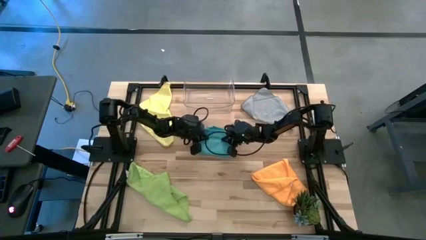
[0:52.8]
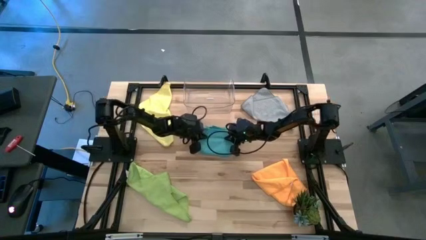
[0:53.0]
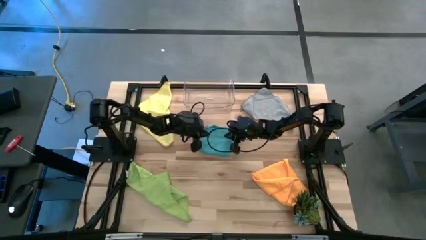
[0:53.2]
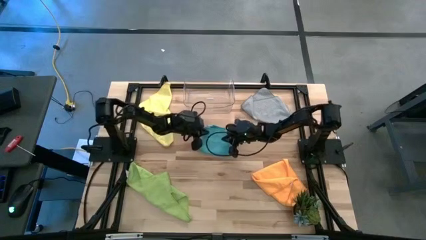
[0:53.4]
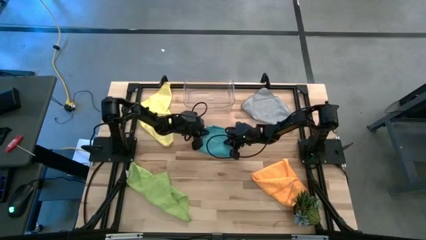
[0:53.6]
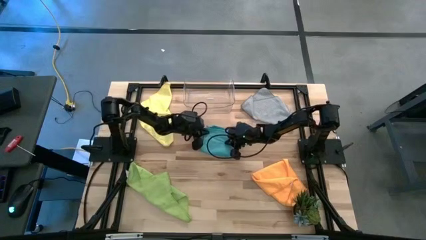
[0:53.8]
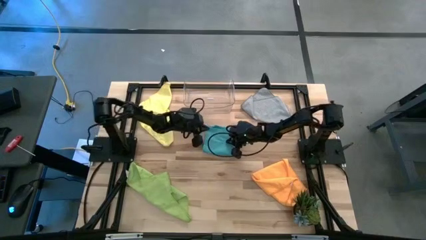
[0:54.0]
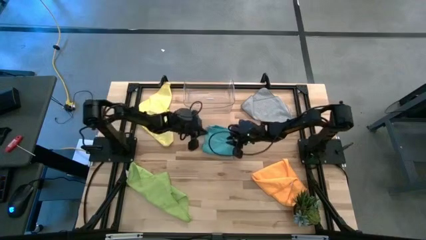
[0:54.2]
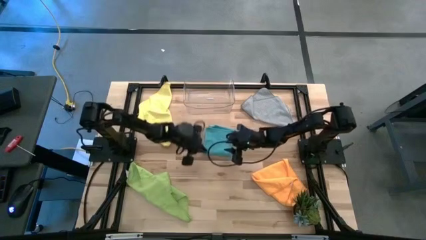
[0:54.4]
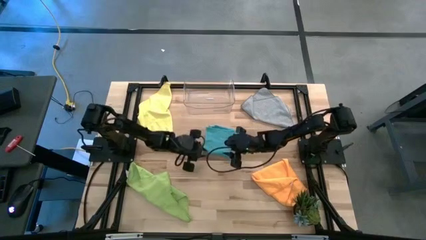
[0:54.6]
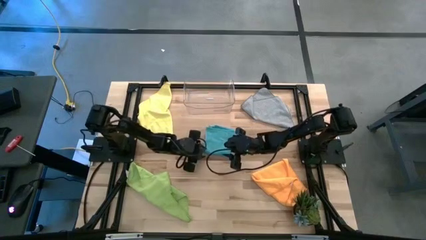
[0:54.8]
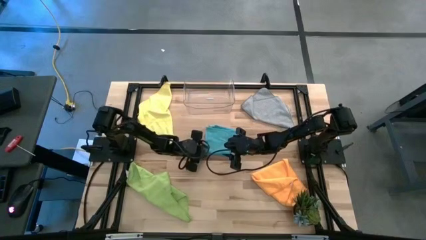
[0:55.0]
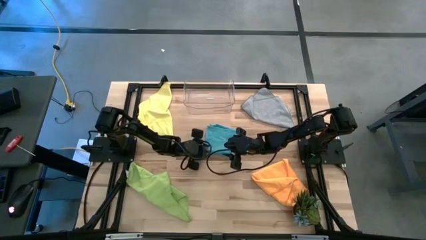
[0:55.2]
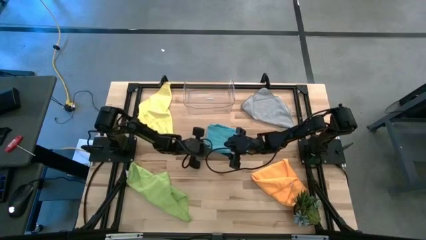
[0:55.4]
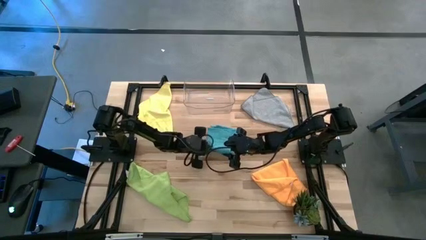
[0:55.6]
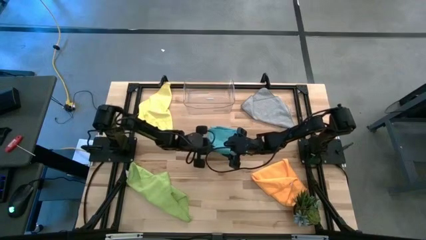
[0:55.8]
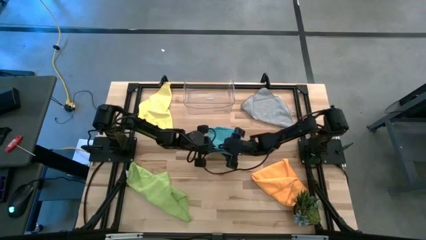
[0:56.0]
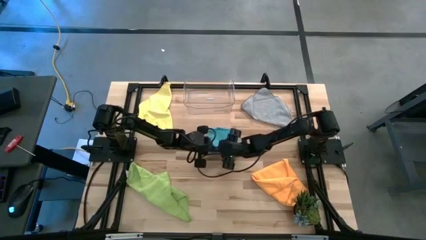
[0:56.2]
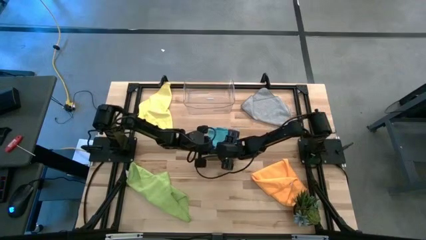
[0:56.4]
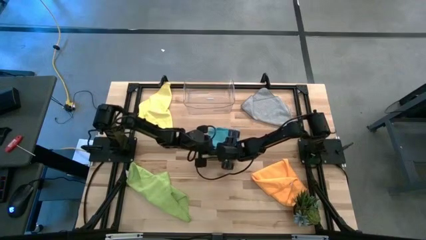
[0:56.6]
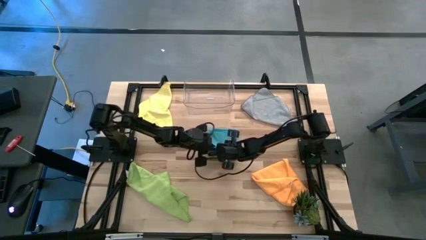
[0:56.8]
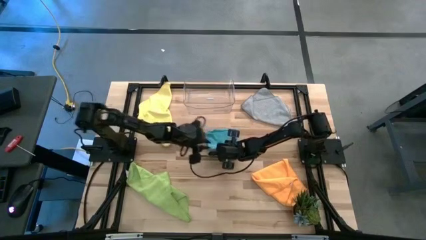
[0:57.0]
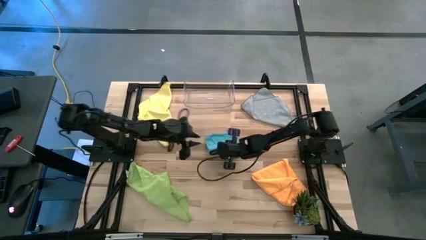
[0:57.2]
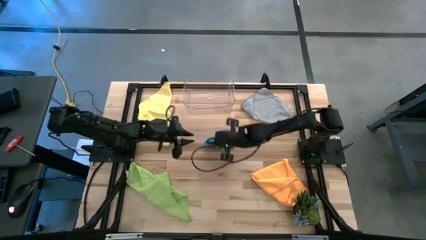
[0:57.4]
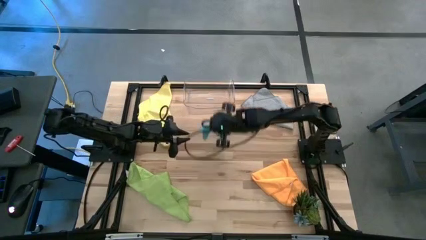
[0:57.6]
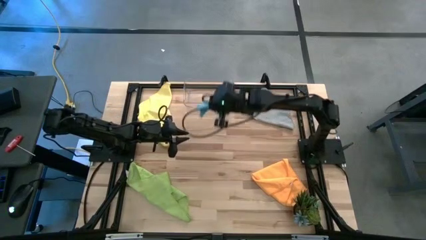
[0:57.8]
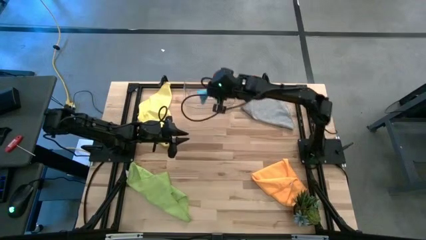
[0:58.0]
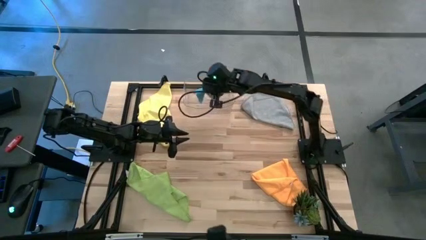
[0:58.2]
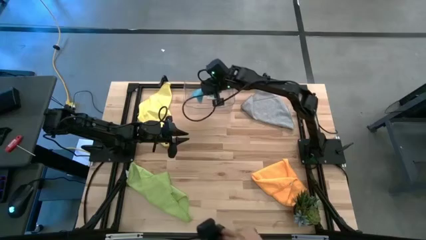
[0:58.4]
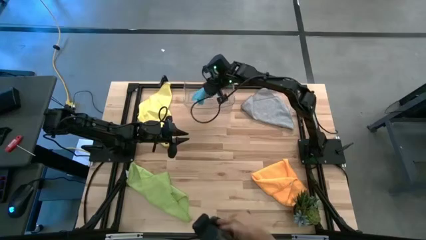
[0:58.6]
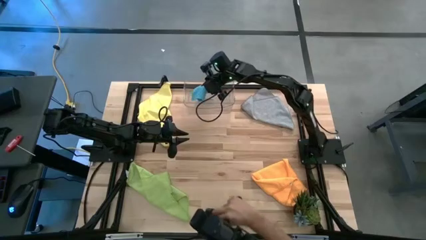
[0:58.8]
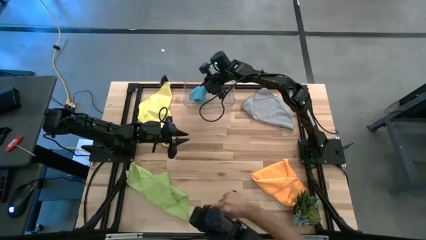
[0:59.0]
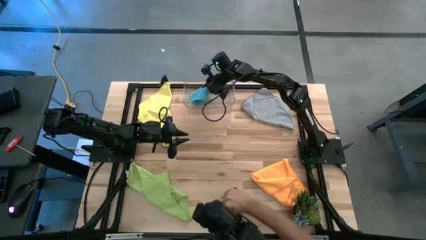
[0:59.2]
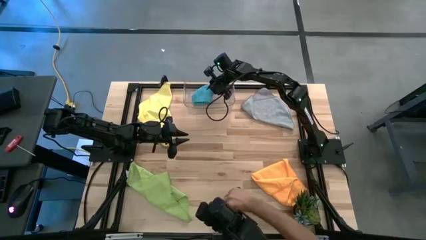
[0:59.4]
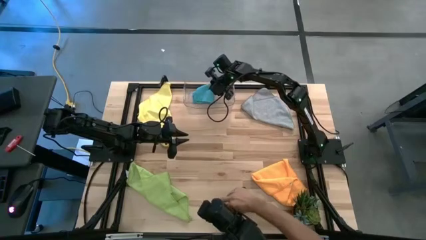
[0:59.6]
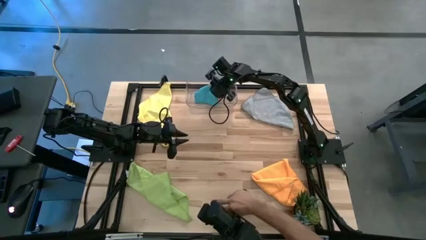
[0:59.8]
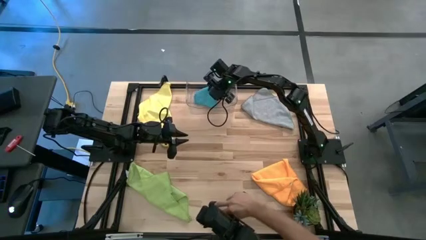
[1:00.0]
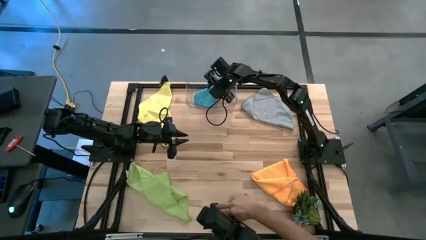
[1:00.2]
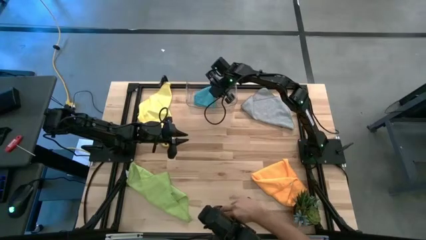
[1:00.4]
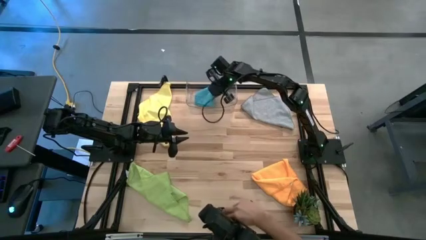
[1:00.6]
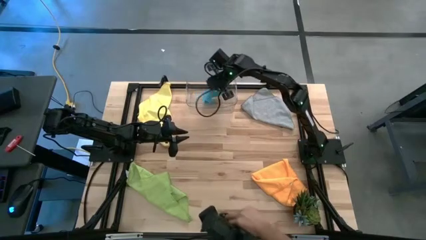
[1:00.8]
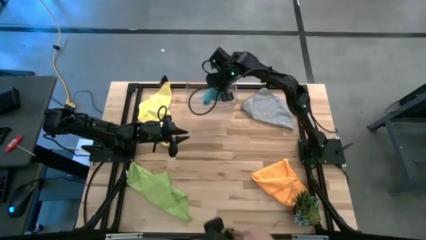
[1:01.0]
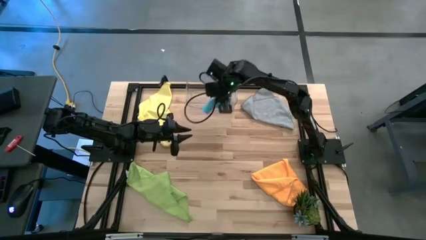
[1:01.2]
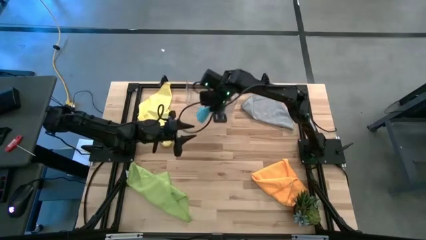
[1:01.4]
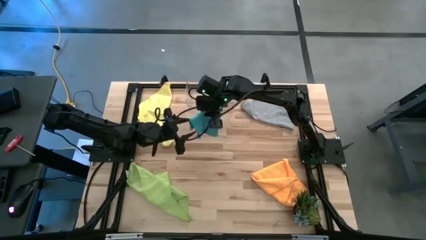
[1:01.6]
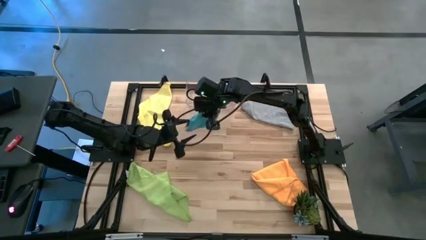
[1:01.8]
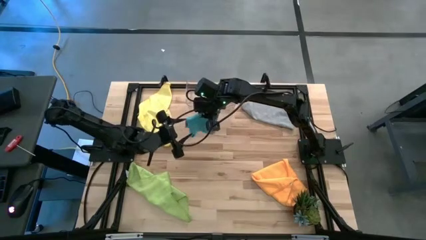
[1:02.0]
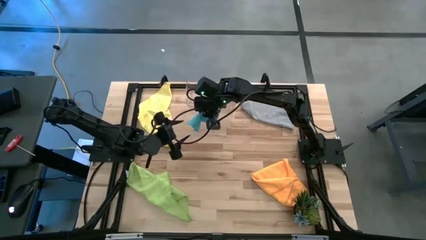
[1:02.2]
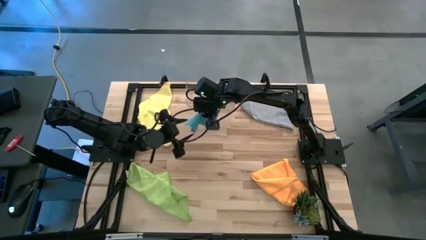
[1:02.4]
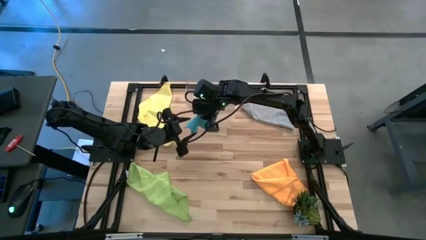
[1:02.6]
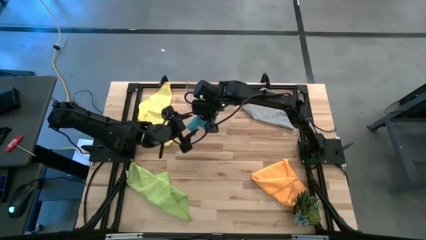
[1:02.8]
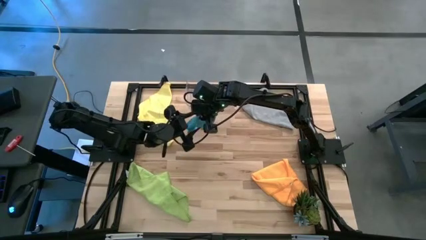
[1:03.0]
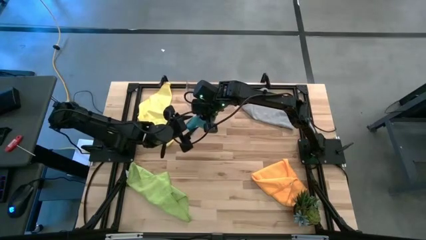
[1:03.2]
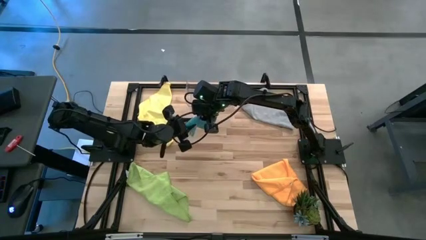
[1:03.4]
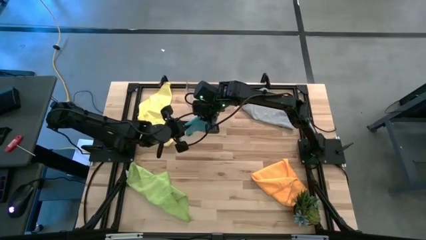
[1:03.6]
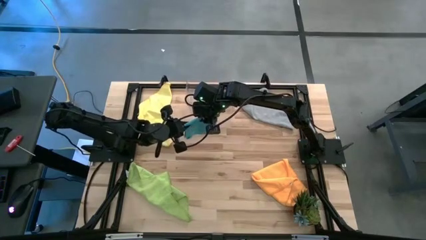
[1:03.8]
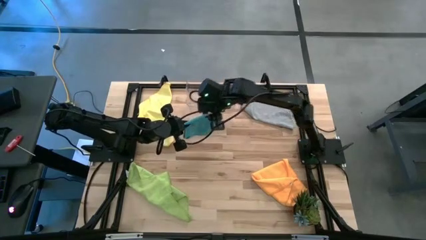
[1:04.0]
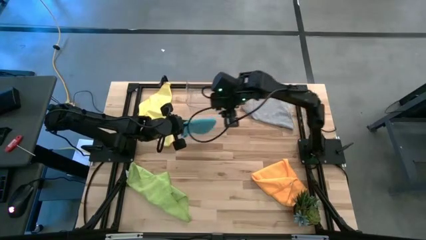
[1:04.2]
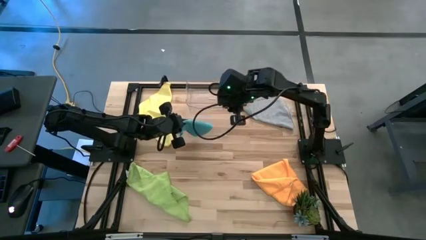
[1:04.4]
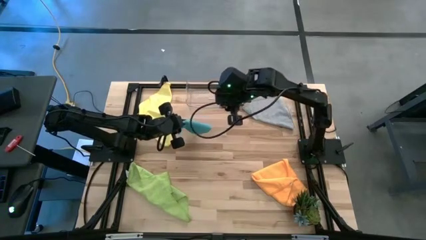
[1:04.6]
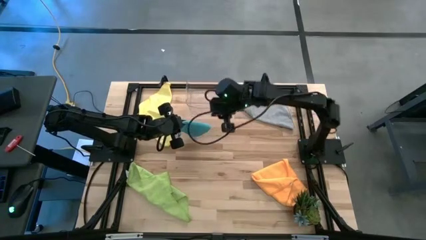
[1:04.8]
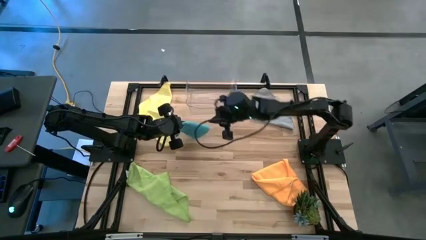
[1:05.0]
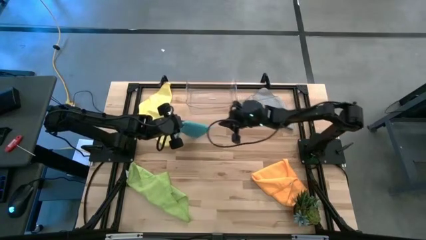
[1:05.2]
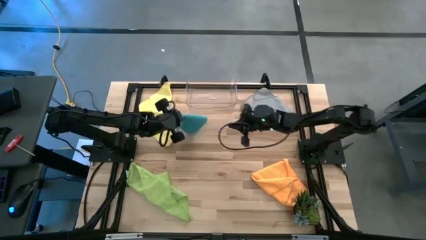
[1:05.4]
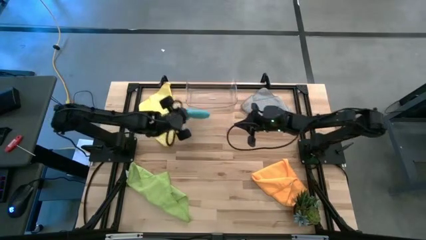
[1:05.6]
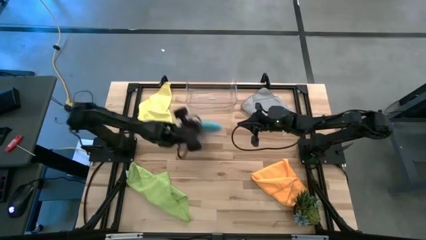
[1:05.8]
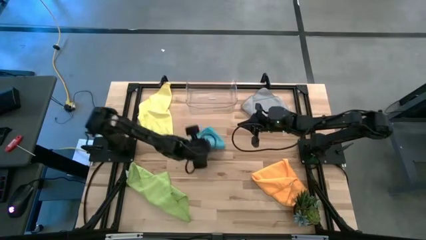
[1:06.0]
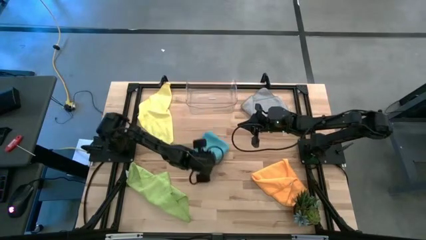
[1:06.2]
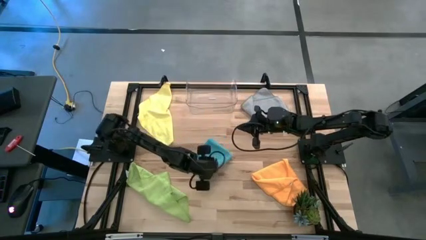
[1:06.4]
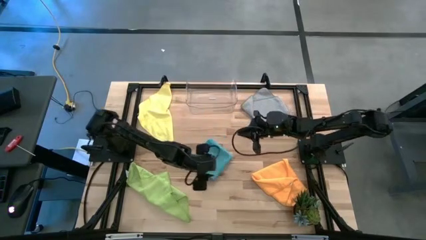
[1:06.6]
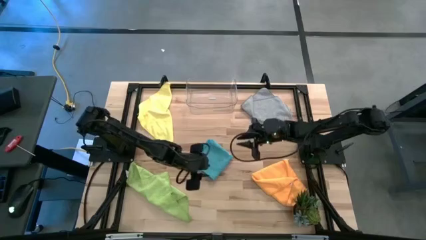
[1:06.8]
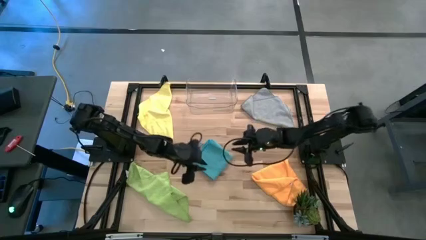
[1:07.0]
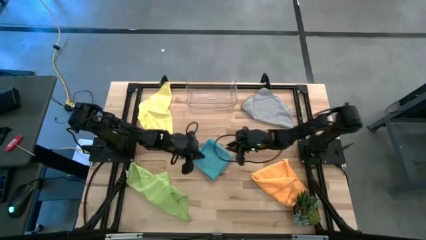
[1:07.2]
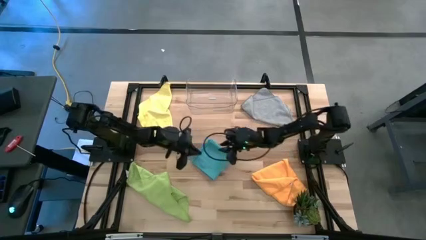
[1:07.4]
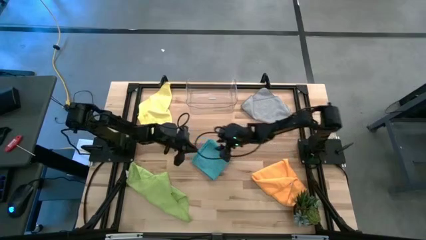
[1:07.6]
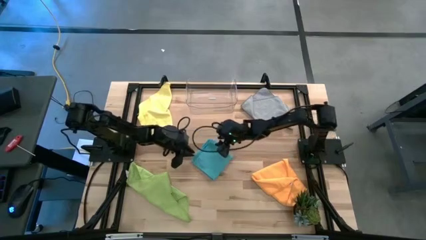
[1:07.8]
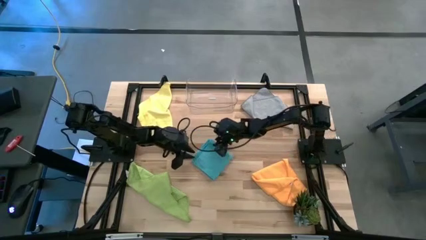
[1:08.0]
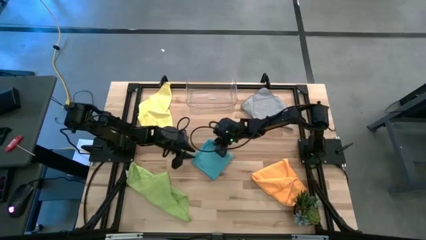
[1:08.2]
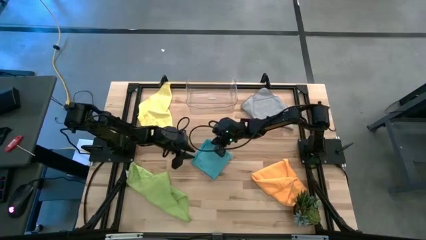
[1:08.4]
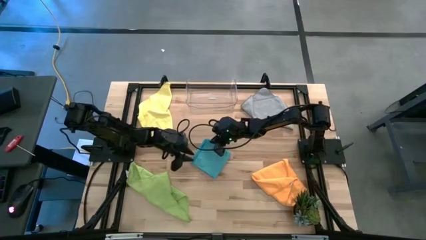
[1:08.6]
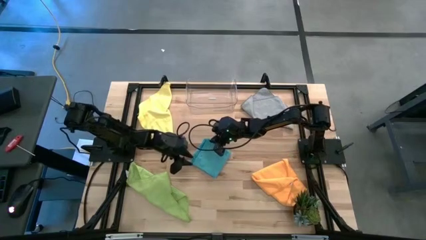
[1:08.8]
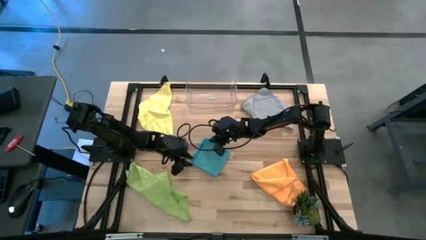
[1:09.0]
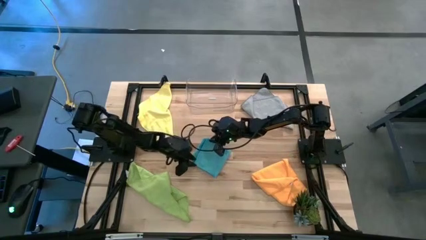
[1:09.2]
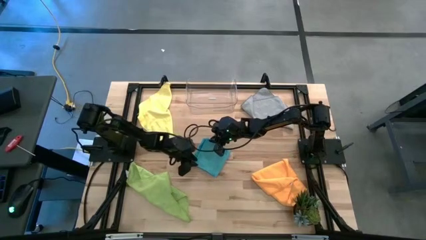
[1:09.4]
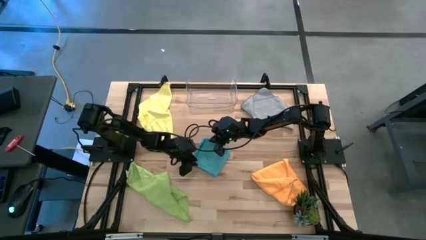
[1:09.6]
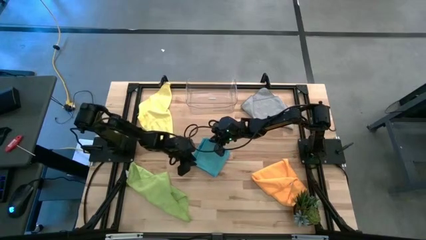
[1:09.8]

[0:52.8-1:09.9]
Task: Fold microfiber towels
Fold the blue towel
